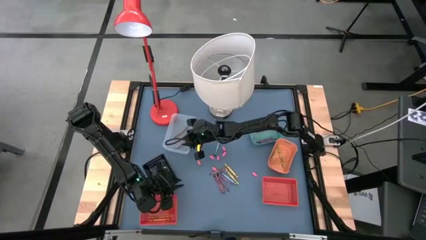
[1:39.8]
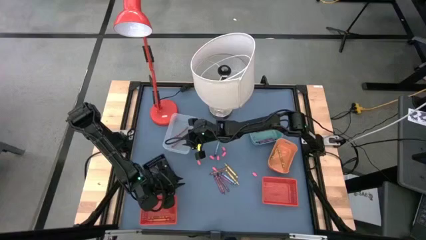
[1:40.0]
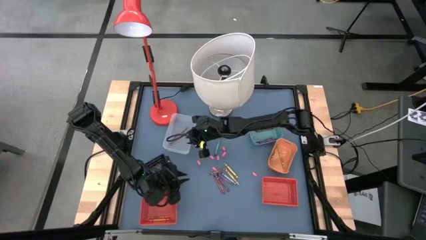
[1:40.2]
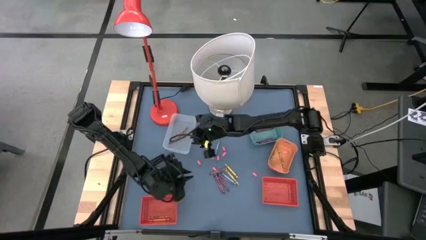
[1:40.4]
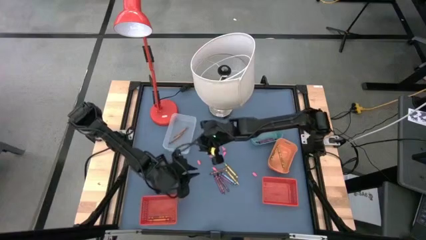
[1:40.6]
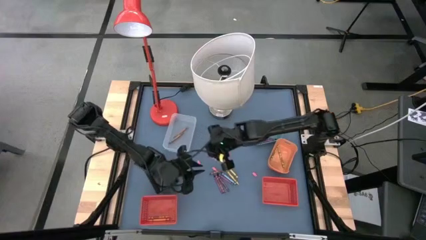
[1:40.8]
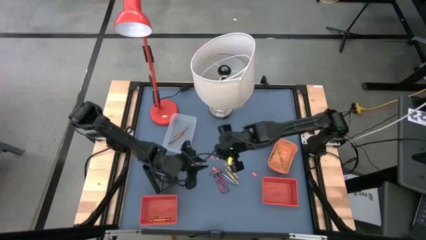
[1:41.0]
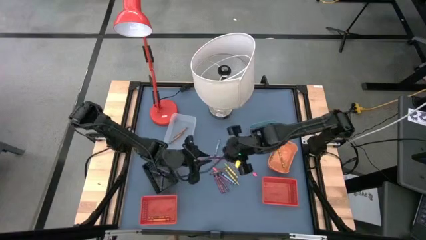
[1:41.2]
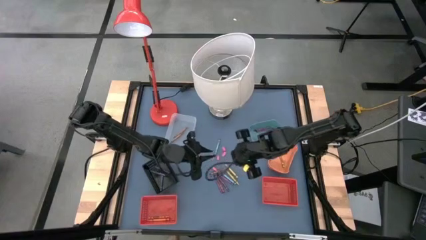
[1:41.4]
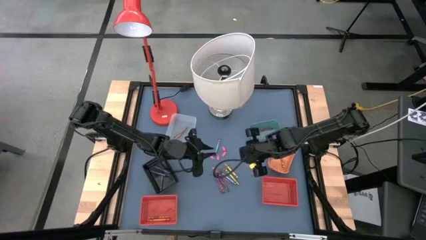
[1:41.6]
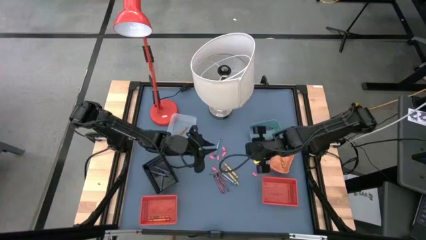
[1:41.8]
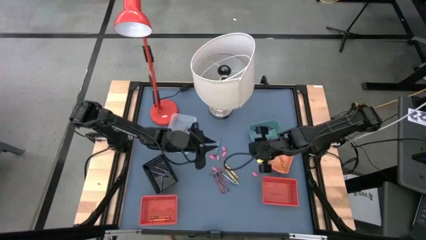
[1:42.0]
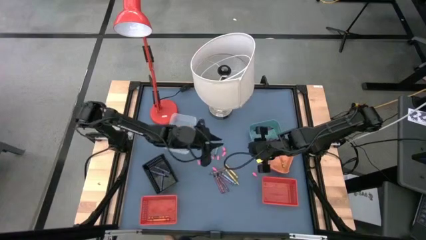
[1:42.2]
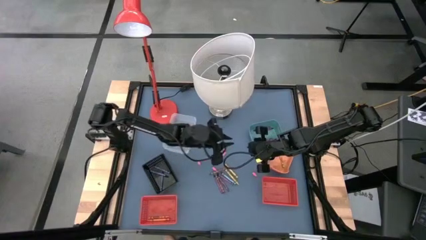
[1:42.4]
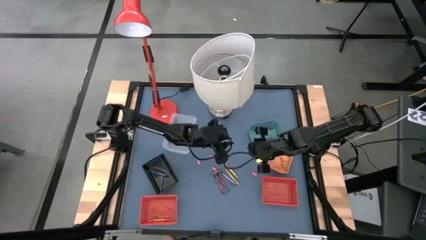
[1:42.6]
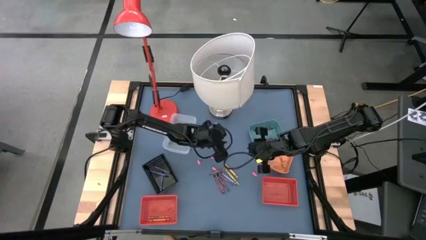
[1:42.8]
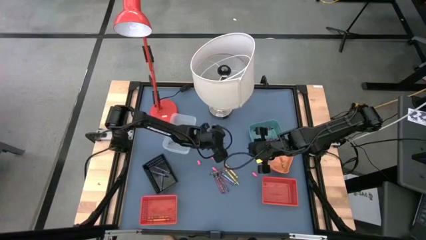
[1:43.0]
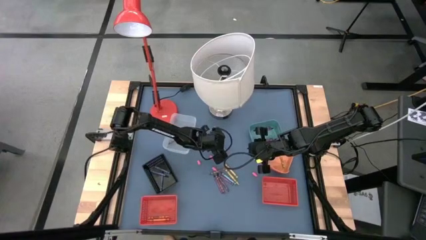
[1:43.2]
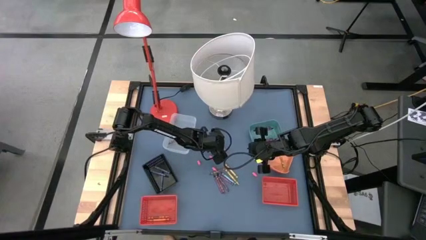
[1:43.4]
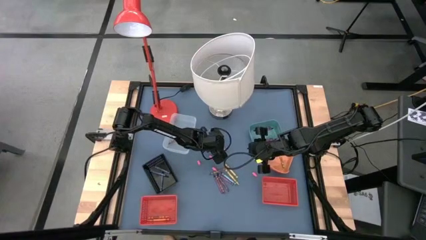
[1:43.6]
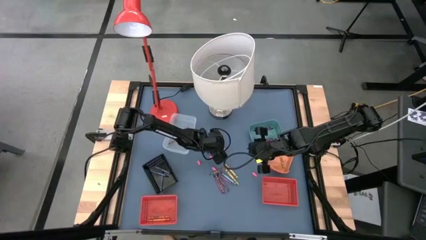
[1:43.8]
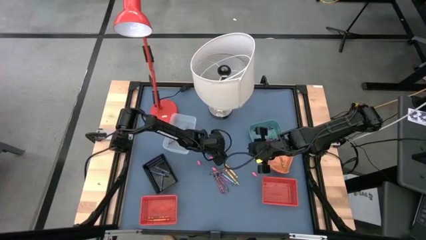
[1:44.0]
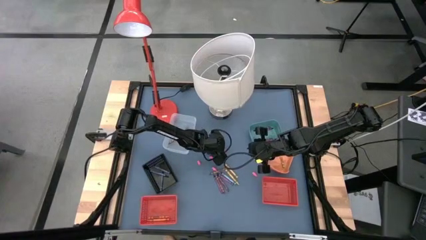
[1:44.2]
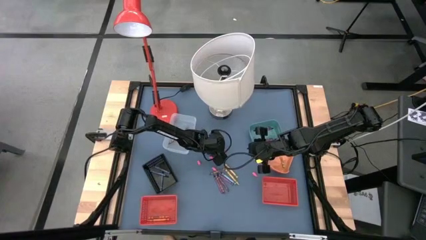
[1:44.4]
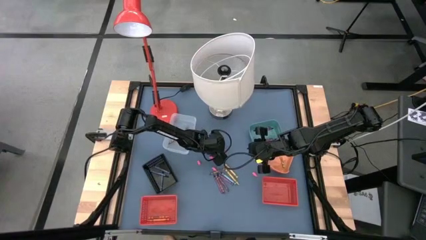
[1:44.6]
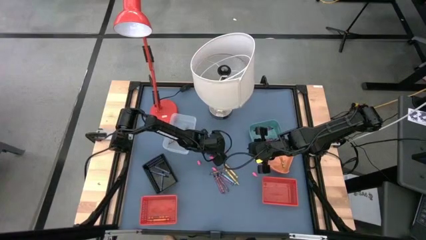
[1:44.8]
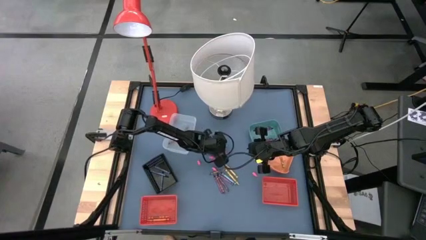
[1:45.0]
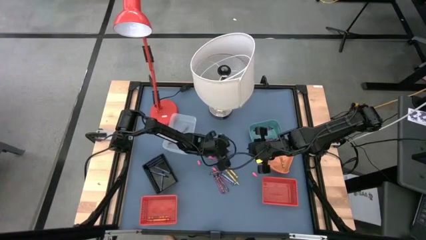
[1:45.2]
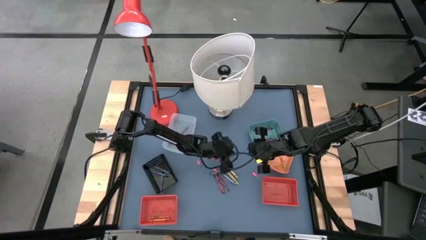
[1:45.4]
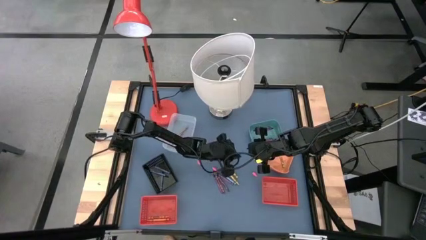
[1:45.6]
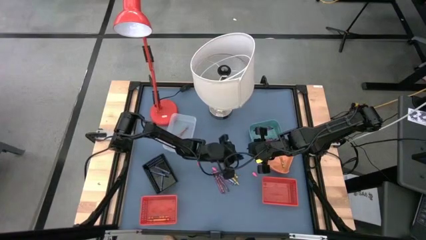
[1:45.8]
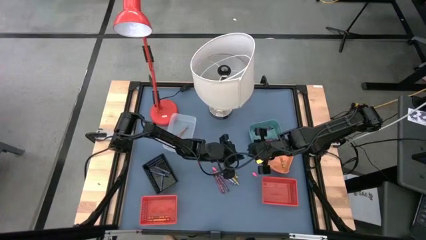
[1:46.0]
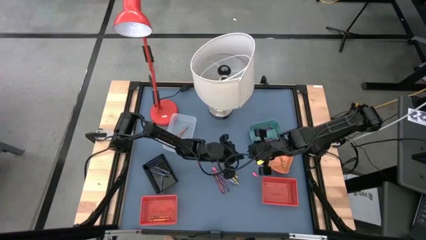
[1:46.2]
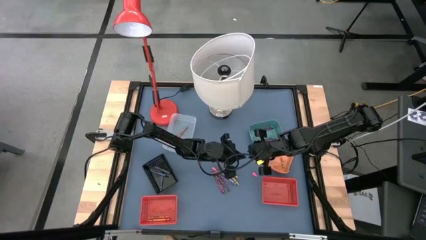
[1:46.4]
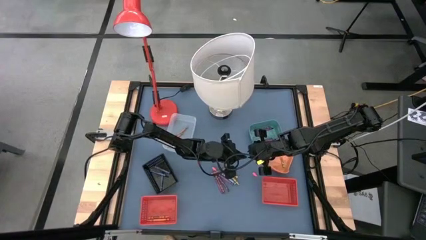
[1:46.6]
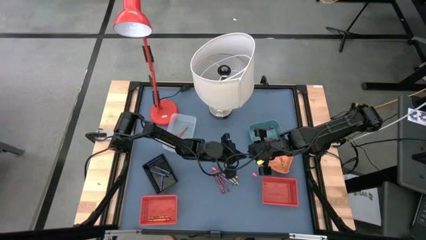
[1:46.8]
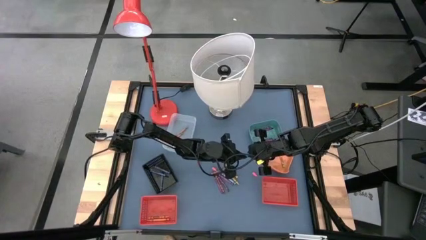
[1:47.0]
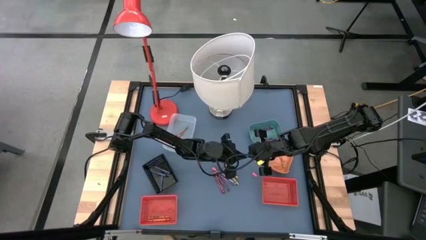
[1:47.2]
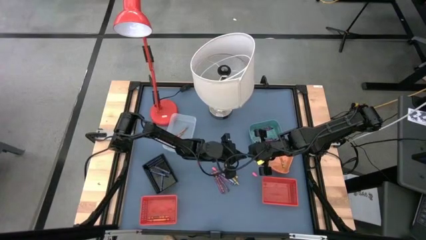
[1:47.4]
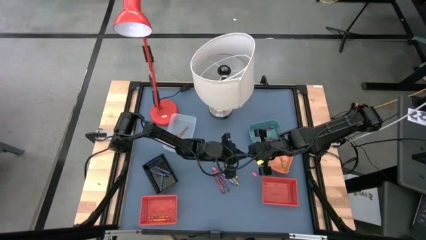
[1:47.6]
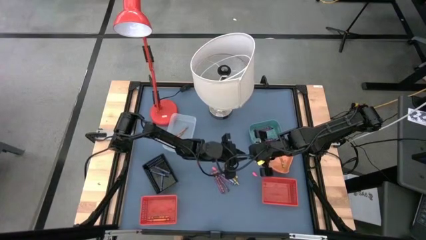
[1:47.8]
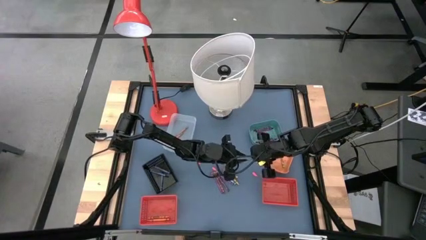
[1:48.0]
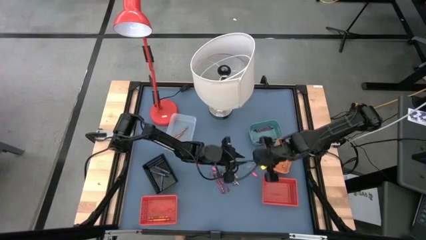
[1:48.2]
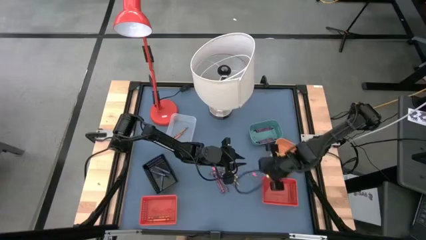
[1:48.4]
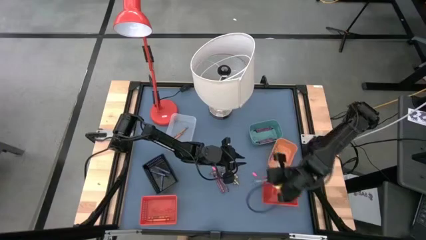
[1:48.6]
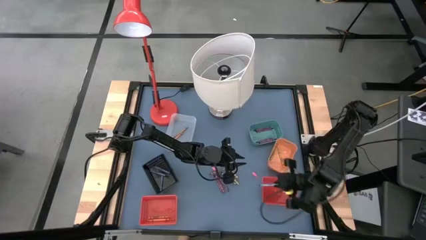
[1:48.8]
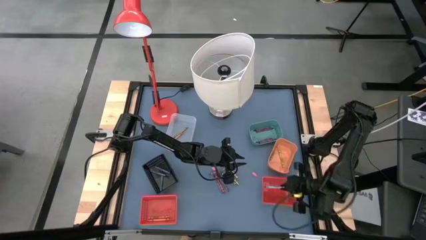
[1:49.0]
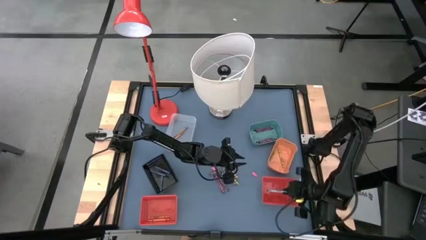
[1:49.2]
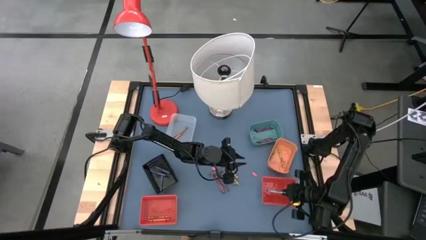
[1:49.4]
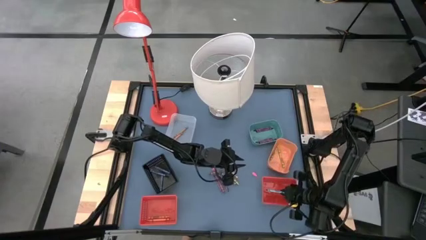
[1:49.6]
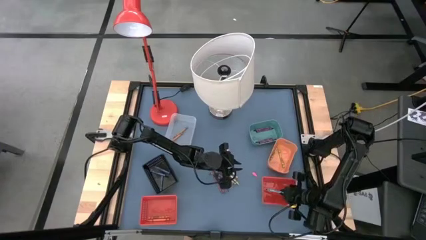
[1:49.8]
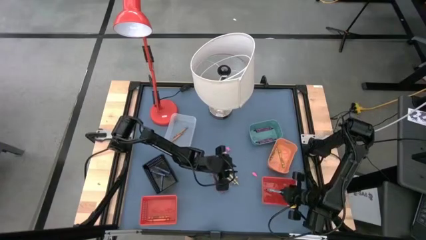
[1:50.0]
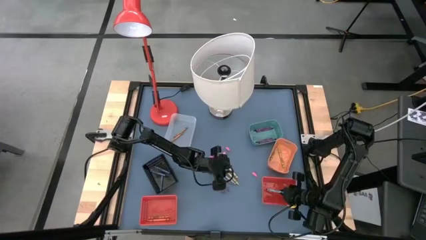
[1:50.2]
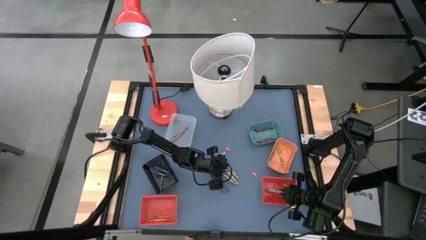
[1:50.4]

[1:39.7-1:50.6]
Task: Sort crayons
Put the blue crayon into the right red bin

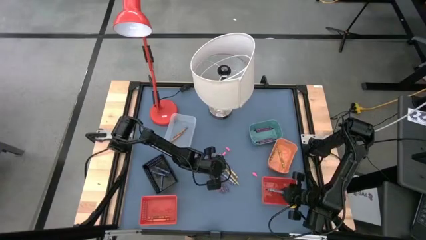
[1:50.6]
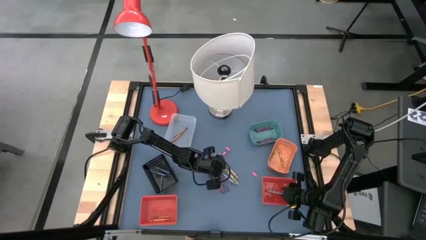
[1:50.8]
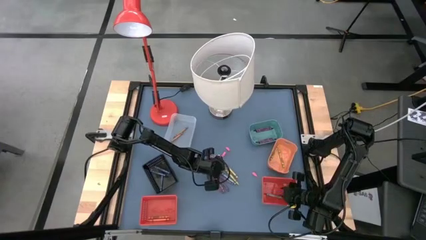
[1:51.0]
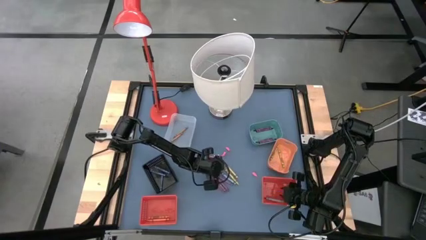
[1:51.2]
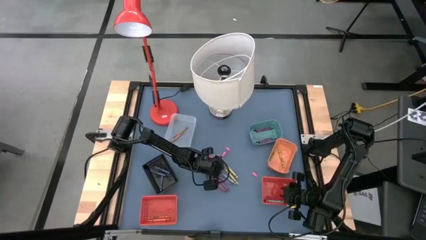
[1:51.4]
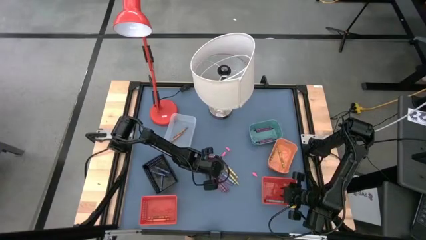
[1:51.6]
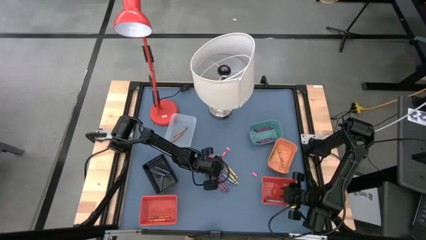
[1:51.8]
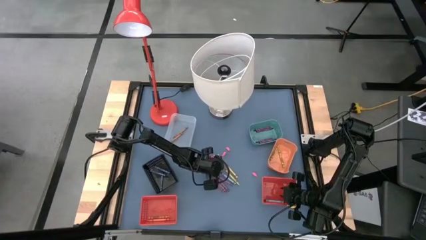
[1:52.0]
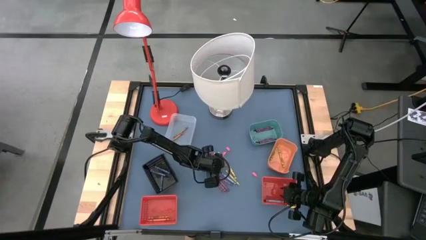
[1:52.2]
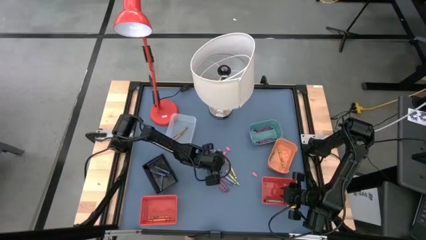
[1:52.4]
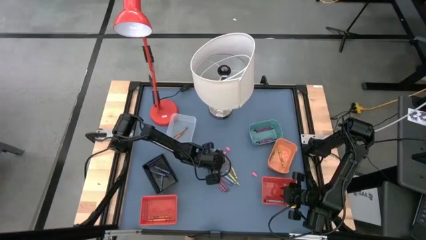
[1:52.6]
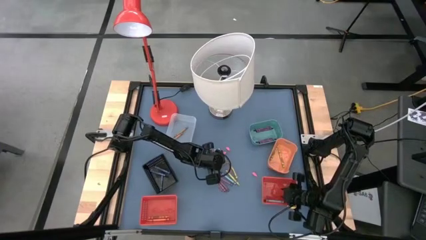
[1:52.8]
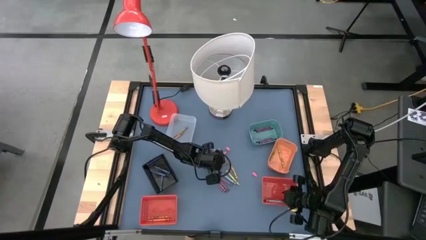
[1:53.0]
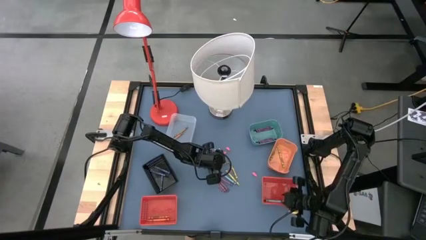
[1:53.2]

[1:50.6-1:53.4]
Put the brown crayon into the transparent bin
